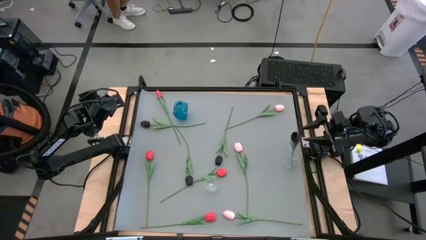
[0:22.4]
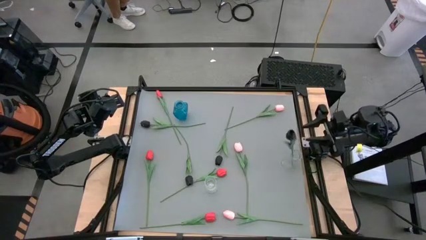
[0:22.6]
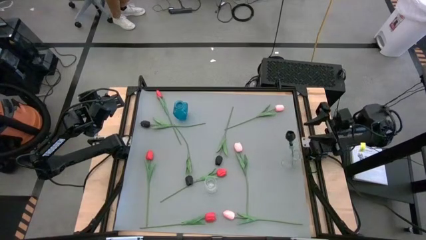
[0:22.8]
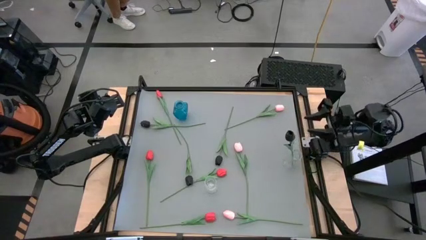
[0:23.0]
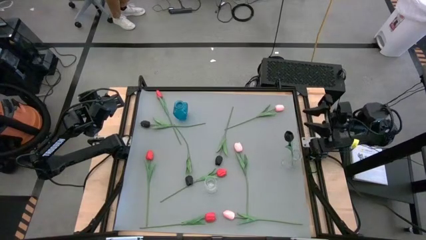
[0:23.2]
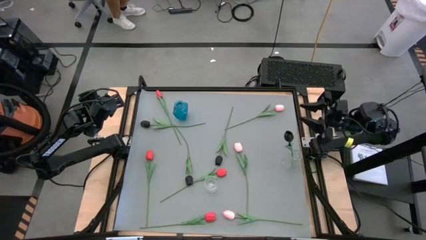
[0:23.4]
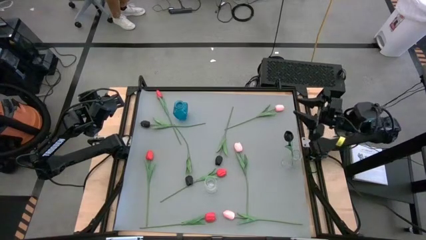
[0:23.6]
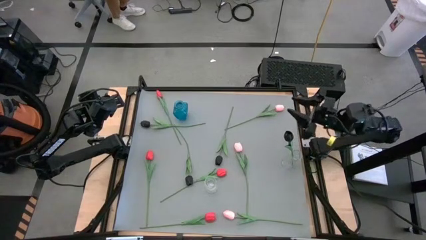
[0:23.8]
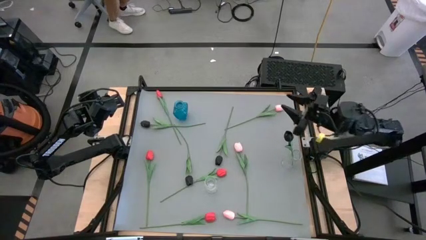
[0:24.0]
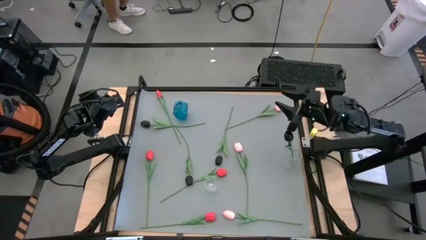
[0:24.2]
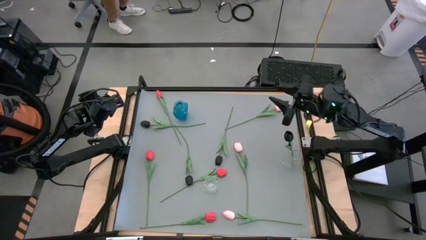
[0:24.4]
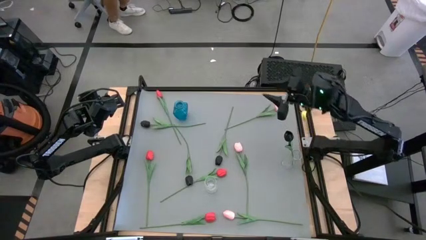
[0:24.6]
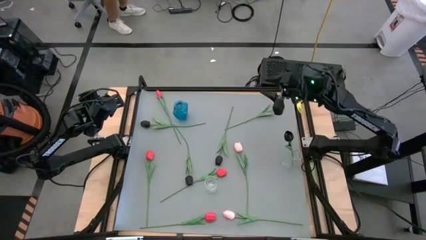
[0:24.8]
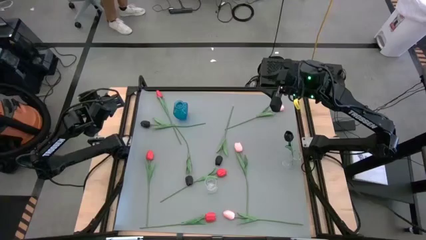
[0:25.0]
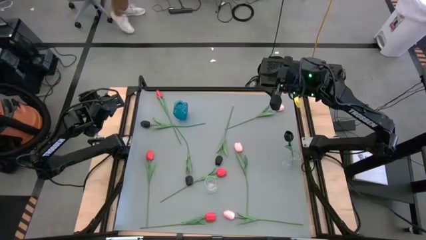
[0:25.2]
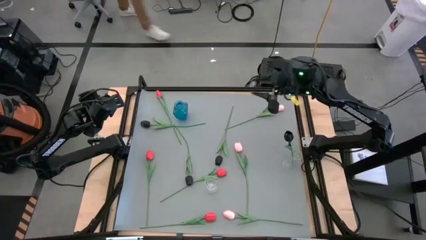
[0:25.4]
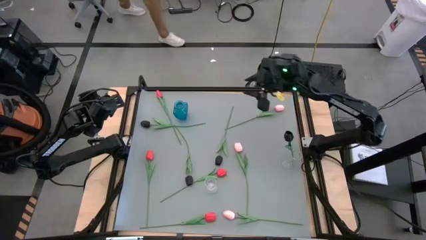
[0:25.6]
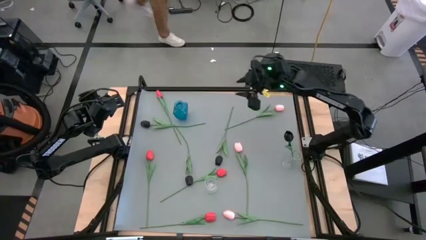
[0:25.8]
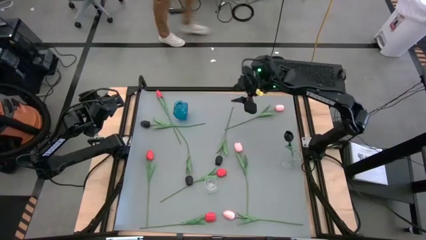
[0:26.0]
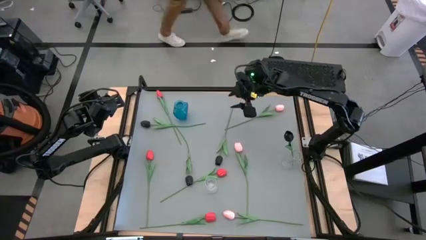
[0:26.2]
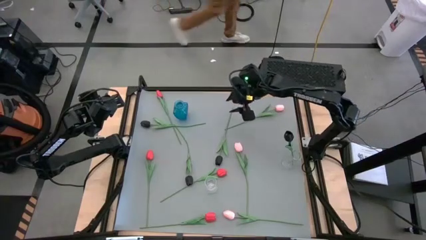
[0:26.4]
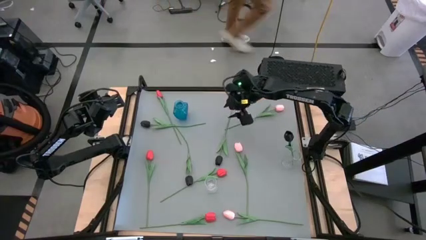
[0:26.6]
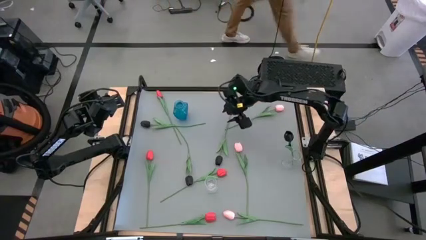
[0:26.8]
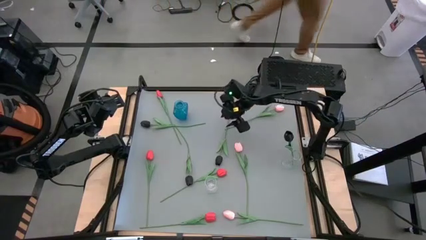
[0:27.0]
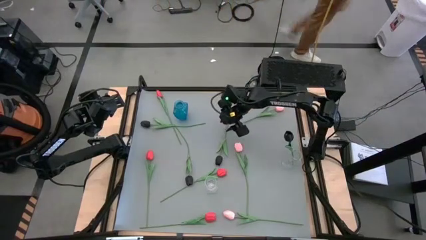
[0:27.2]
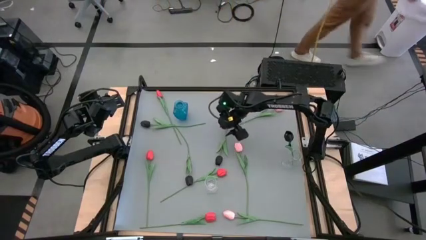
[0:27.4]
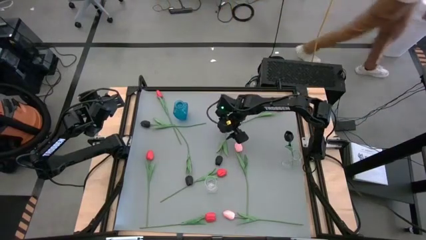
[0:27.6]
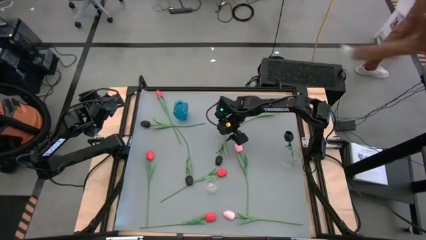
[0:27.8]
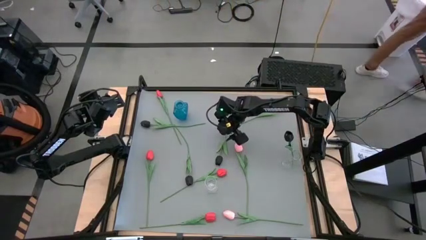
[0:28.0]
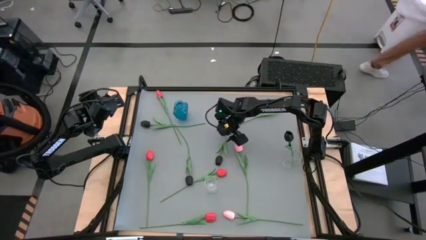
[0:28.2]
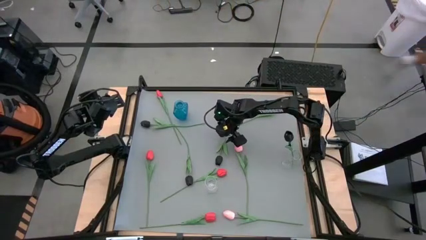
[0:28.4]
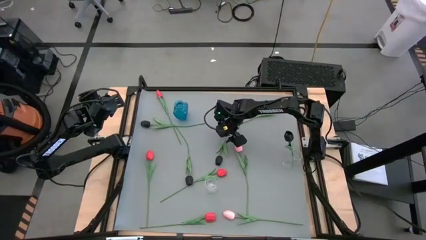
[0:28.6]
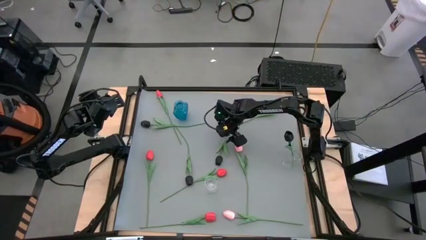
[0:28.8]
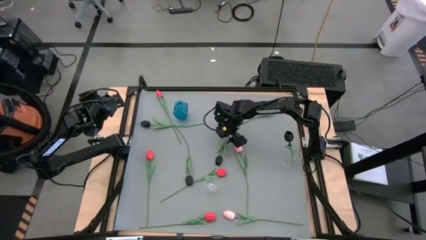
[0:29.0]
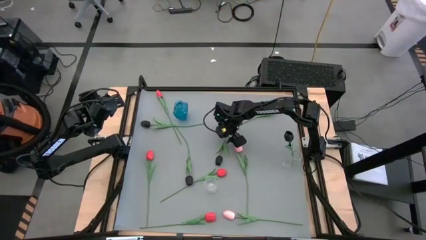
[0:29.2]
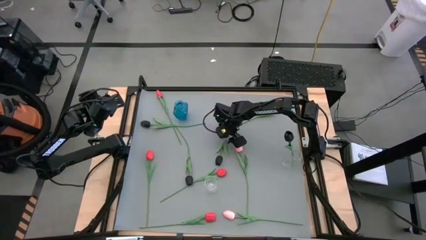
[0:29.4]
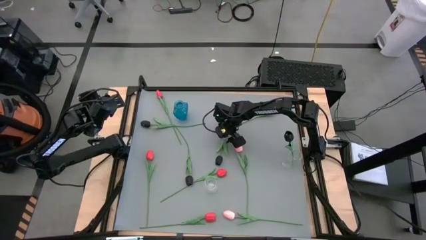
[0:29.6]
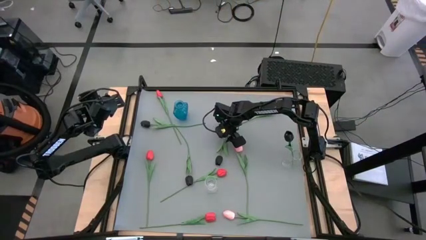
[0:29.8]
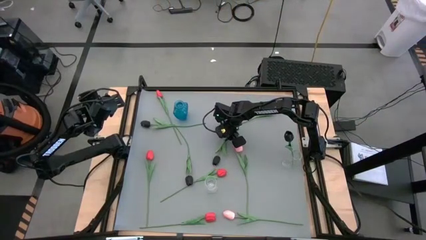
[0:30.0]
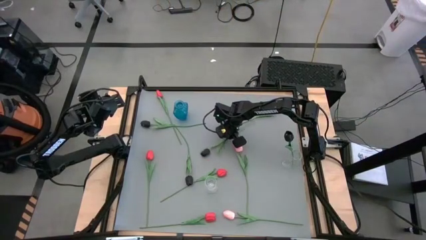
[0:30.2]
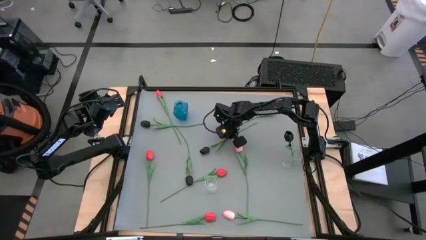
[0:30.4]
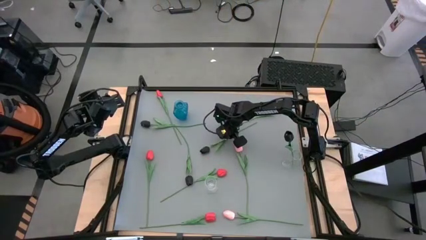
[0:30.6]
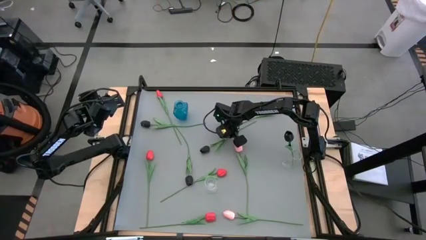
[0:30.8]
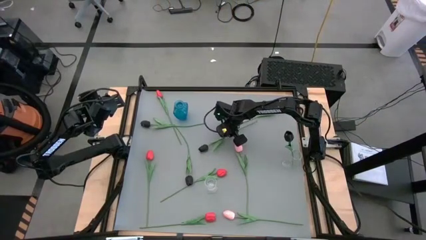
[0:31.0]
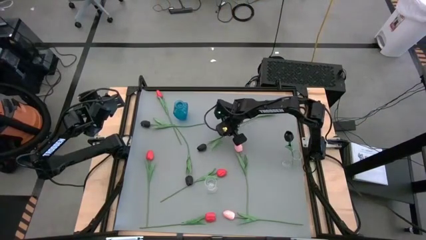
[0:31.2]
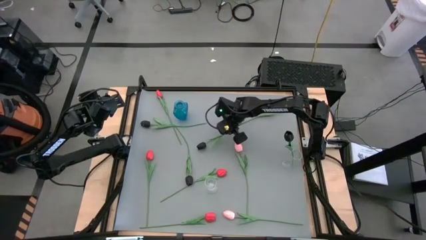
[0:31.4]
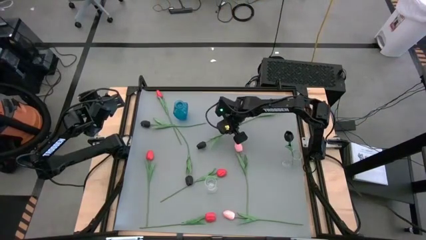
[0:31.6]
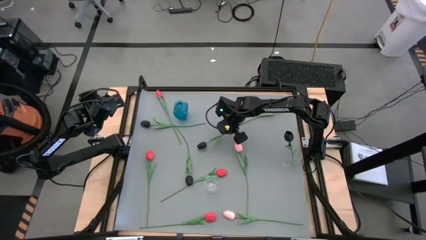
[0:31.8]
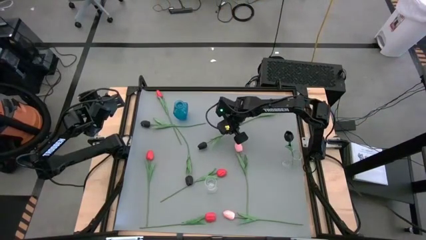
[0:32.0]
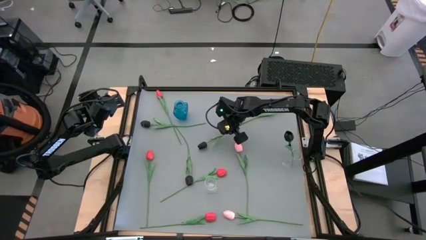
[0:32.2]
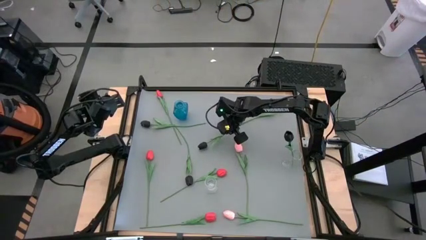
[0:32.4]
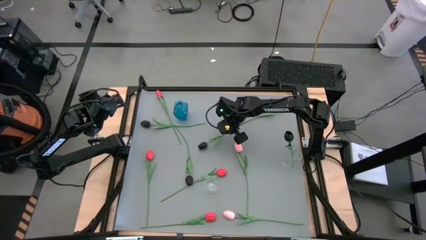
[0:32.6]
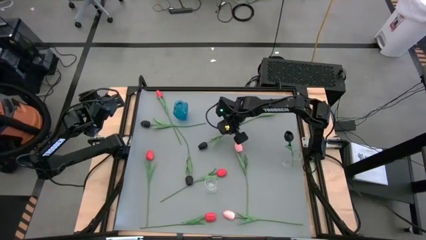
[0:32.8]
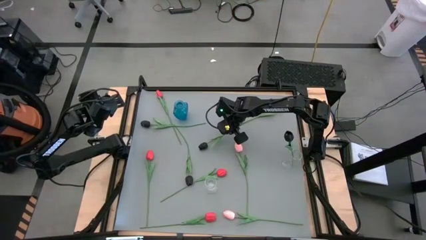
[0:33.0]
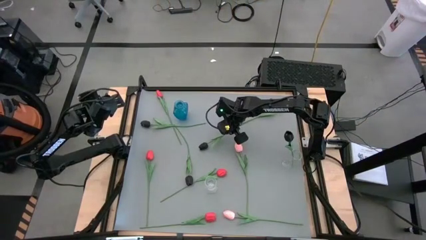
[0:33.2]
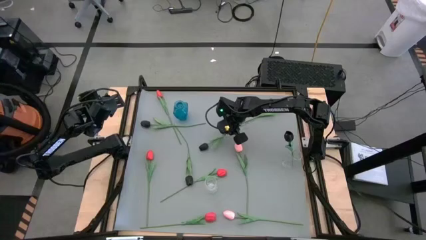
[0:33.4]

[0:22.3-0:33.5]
Task: Sort flowers into vase by color
Put the black flower into the right transparent vase
